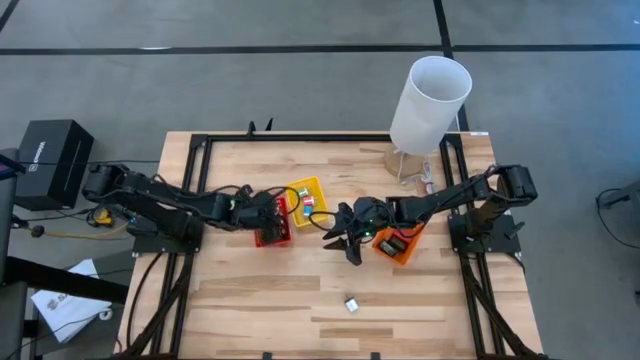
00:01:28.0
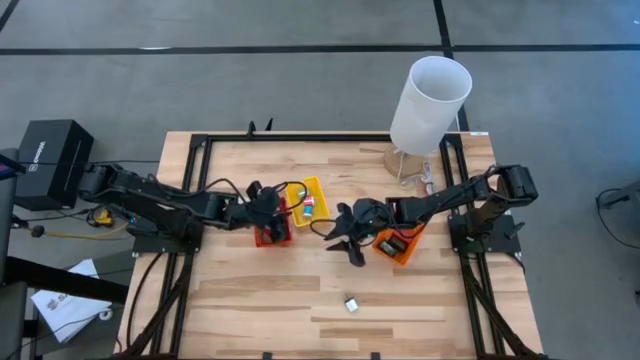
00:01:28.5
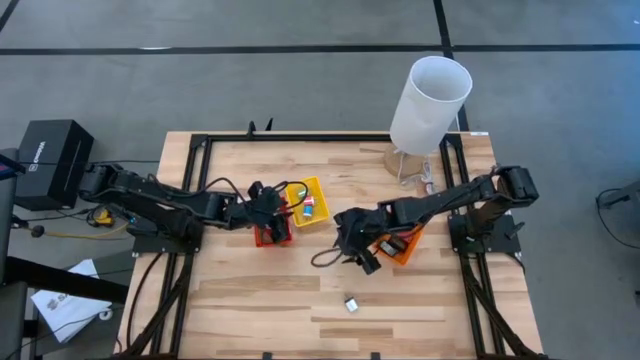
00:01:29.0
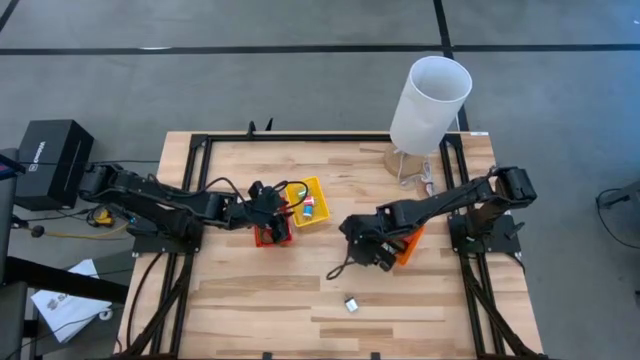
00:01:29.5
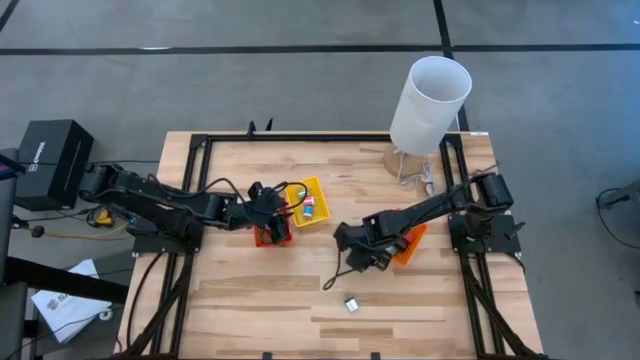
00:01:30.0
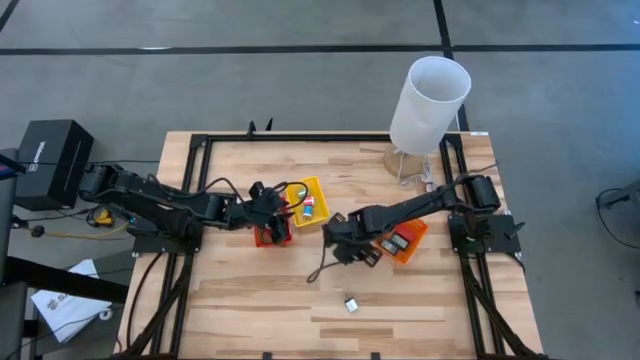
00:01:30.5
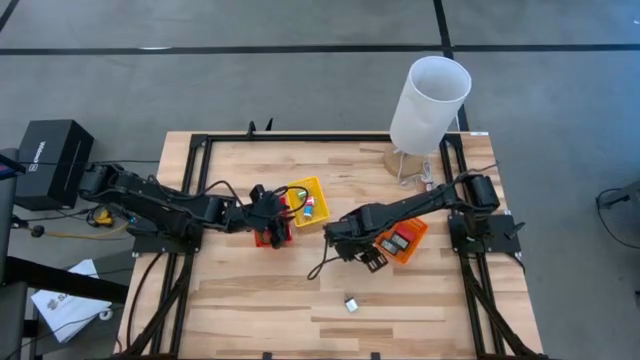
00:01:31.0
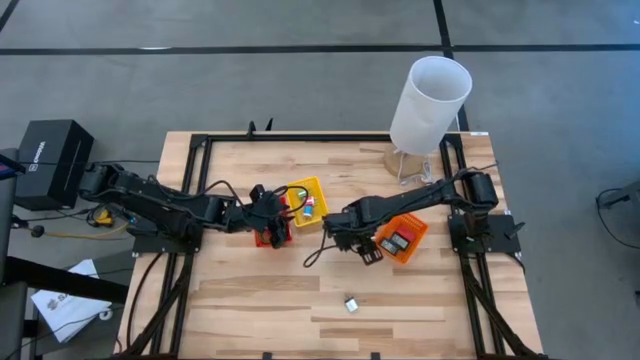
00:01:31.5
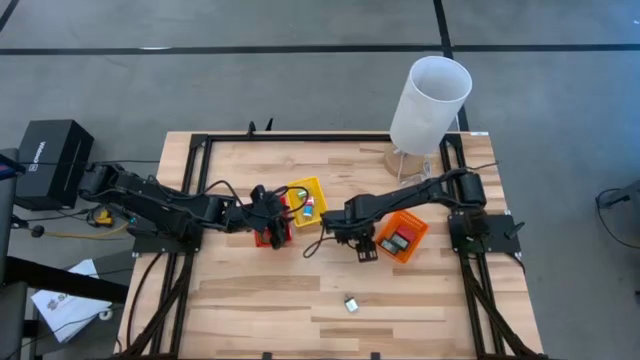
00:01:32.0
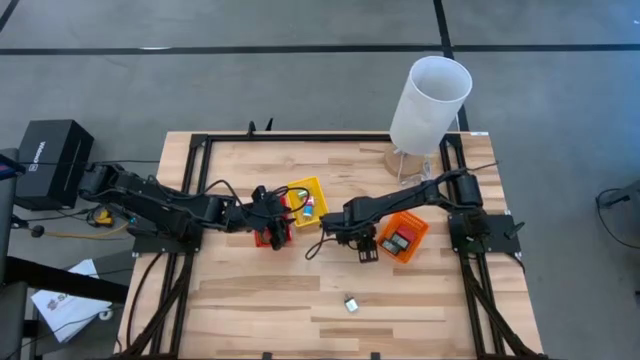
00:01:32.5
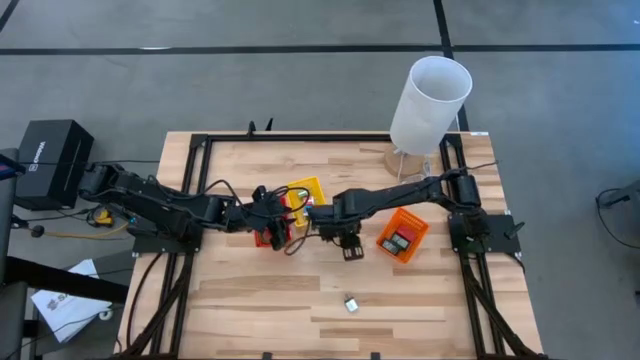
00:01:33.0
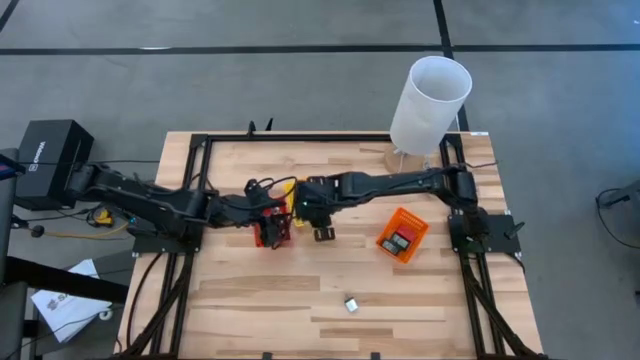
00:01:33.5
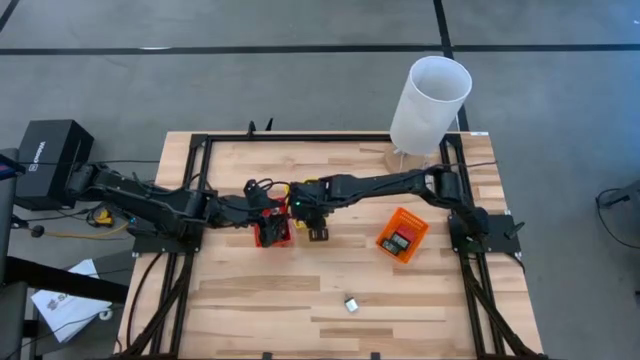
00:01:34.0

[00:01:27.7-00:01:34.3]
Task: Pick & Place Office items
Put the black charger adapter into the yellow bin

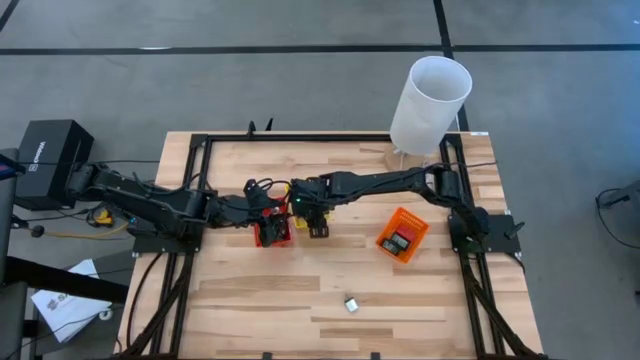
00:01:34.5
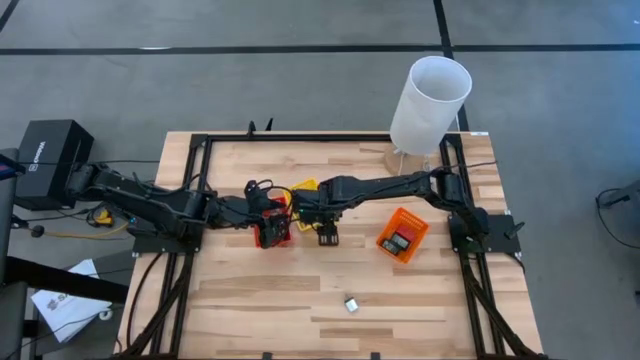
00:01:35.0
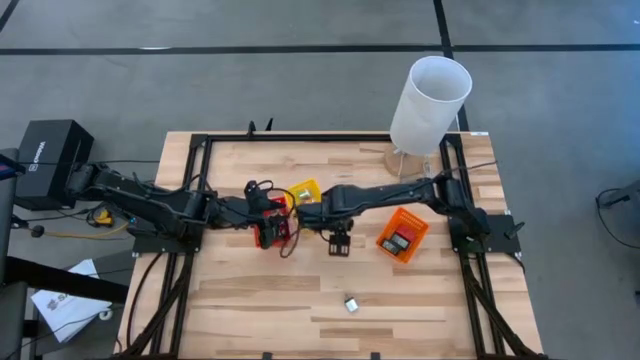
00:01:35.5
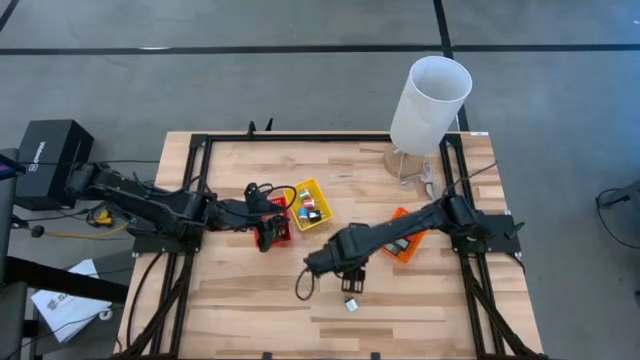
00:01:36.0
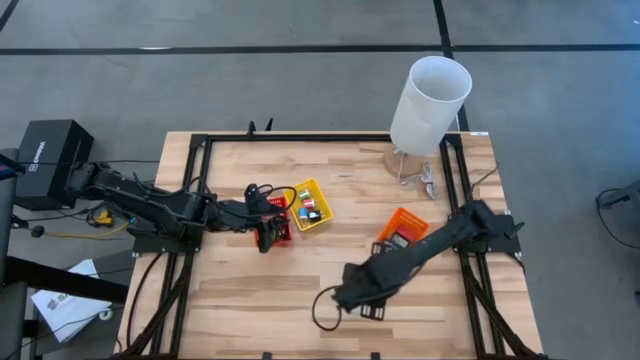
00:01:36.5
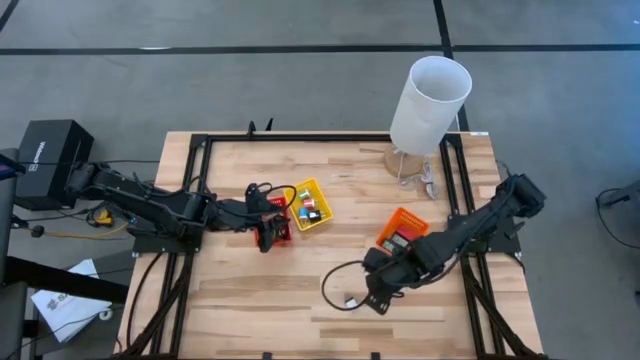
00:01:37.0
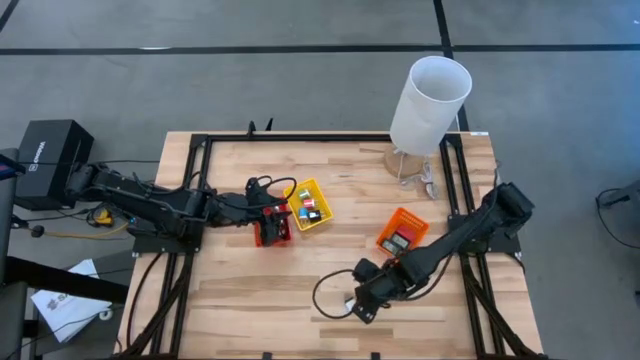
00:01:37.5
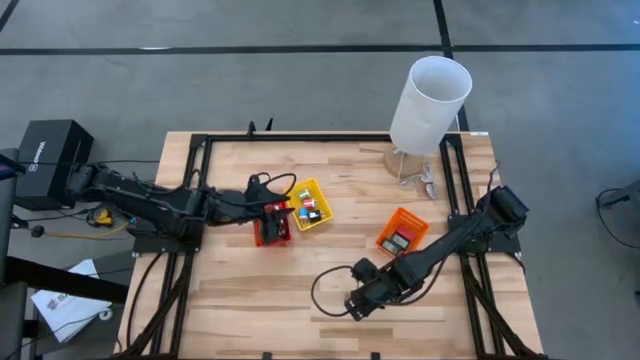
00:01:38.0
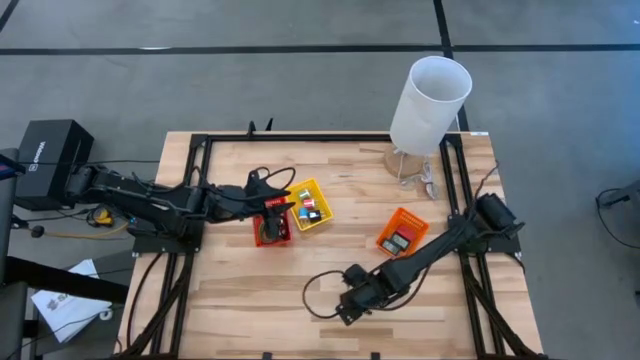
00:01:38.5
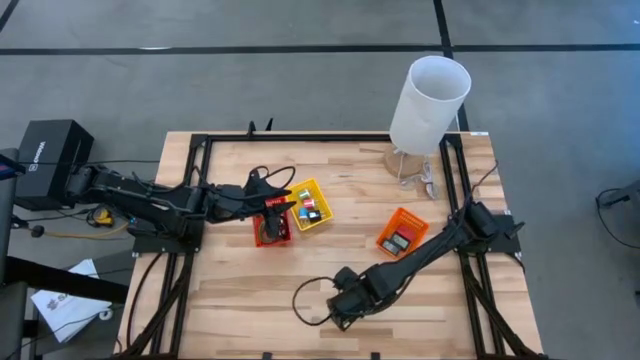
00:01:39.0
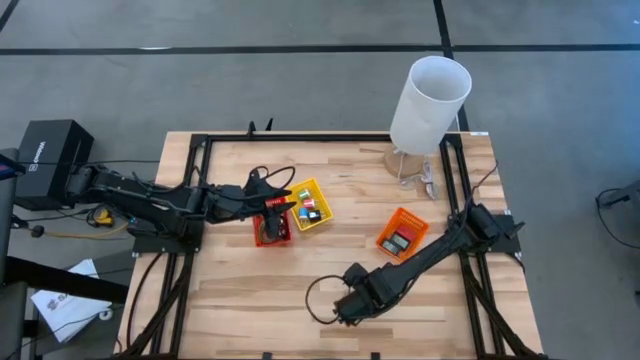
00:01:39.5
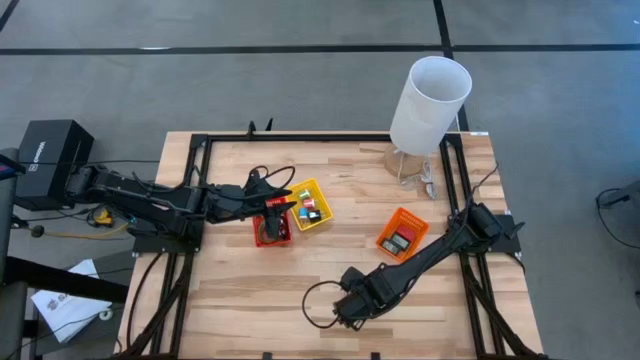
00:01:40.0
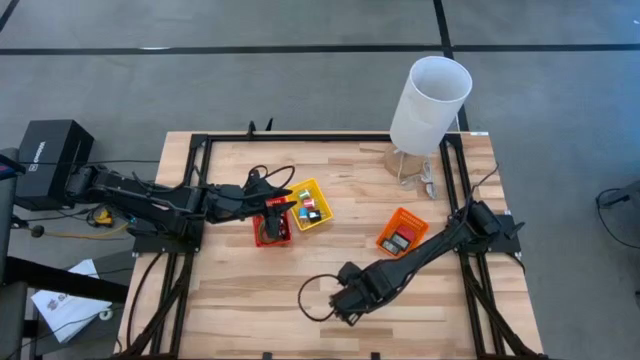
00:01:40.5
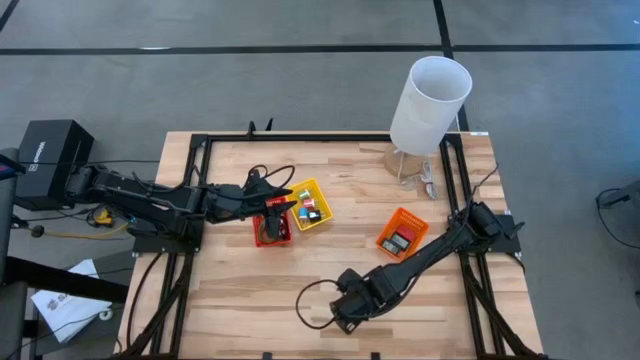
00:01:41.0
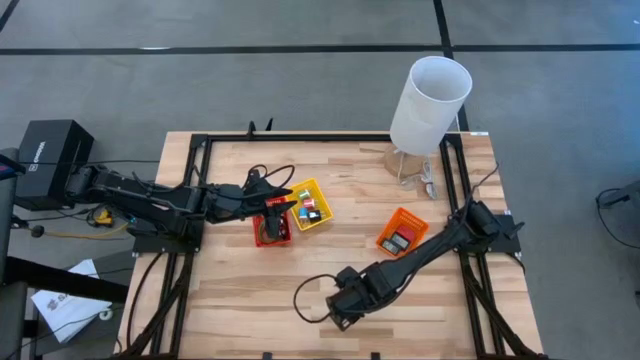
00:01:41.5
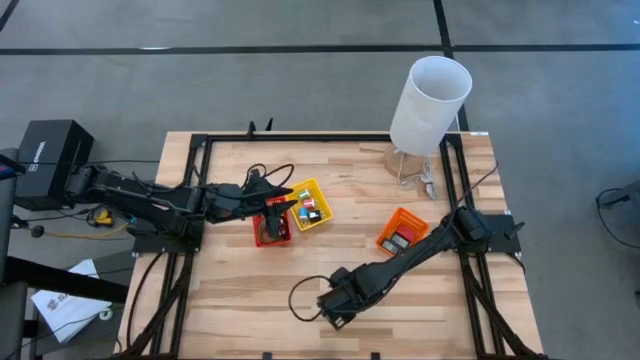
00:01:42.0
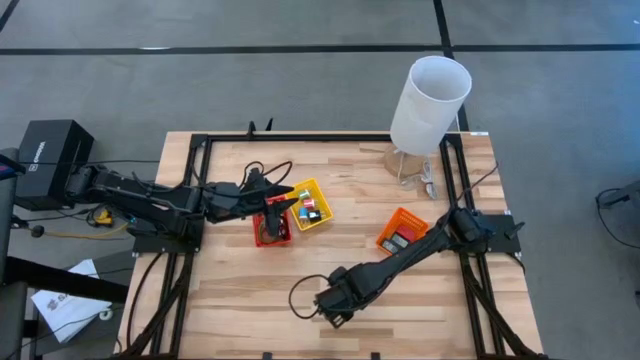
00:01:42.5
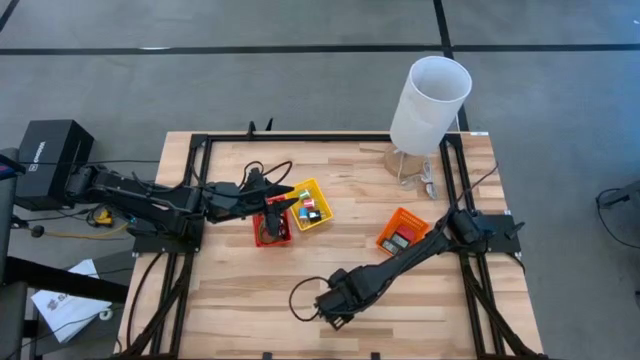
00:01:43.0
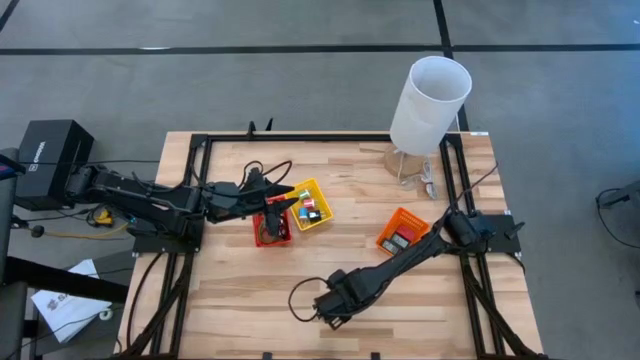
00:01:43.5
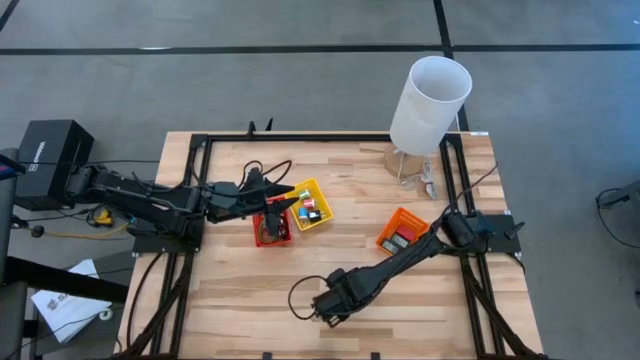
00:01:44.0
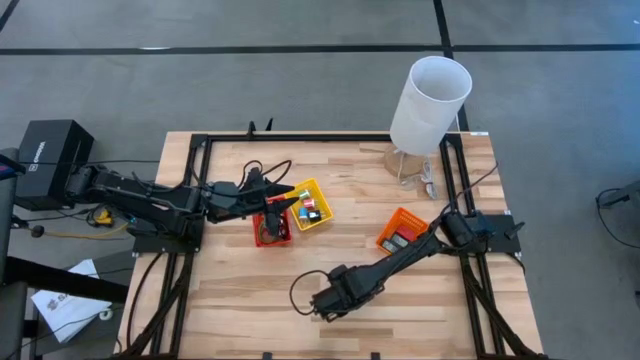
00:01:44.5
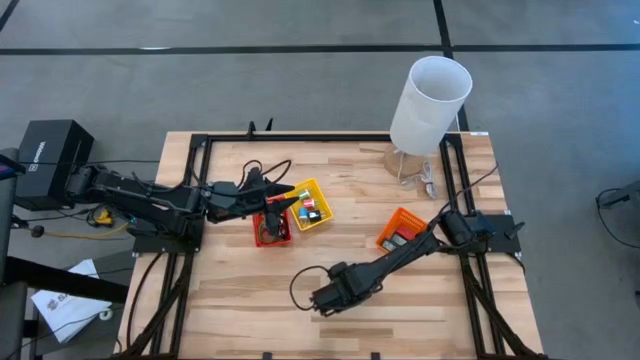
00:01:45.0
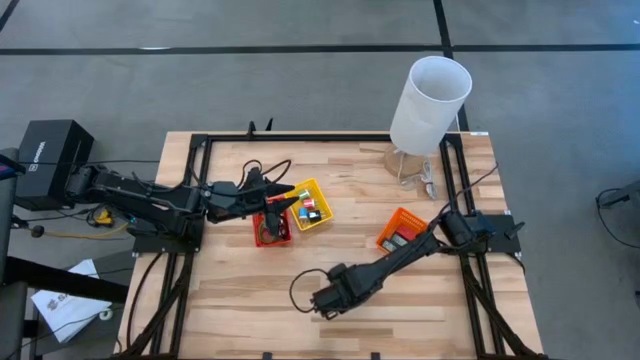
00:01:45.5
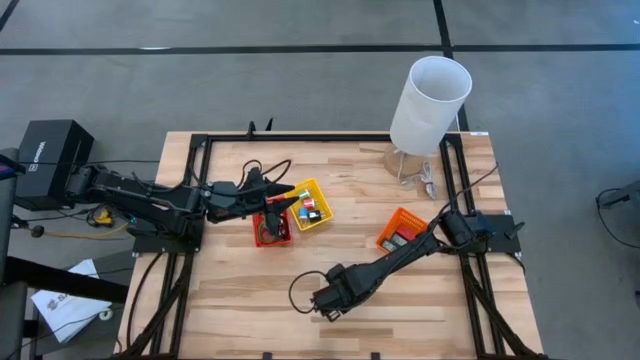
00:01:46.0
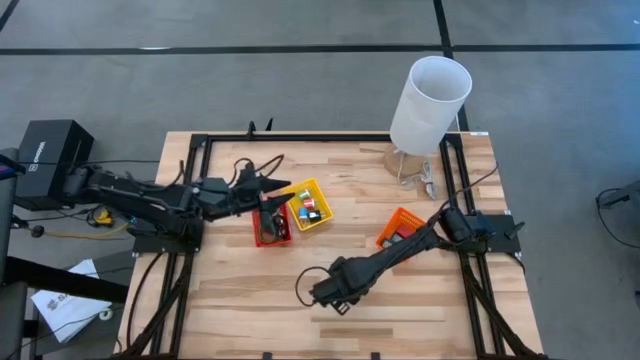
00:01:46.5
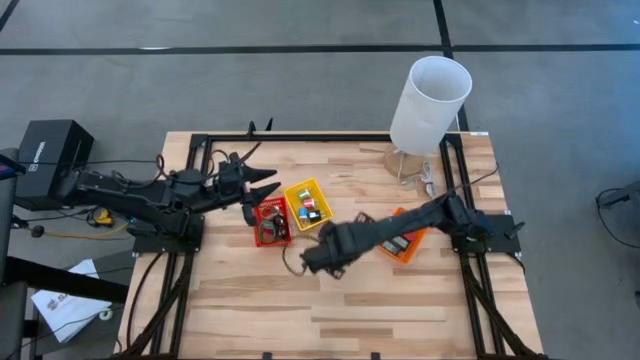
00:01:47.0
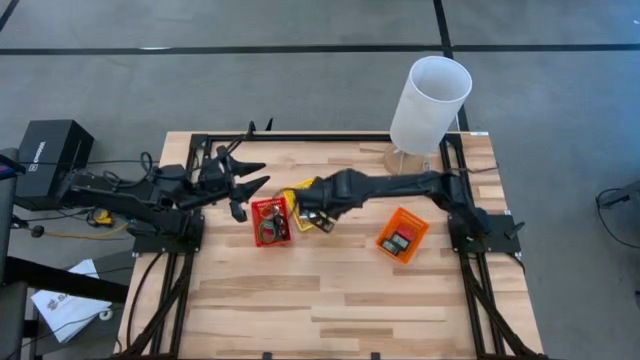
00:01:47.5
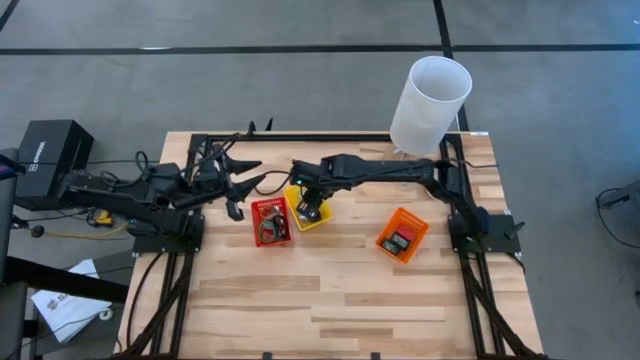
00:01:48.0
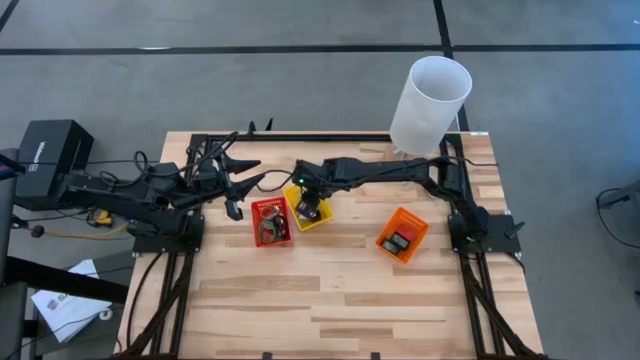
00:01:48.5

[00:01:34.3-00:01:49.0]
Put the white charger adapter into the yellow bin

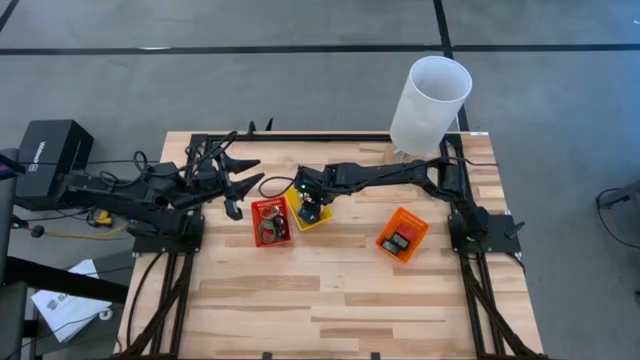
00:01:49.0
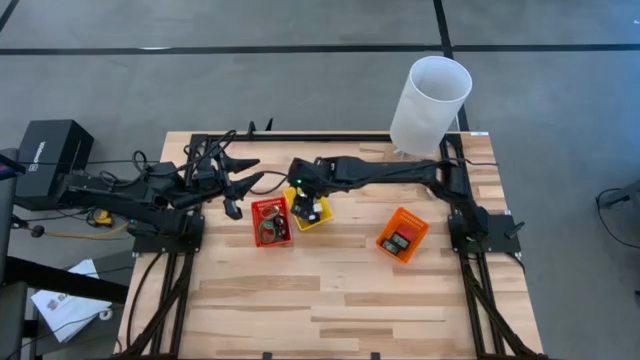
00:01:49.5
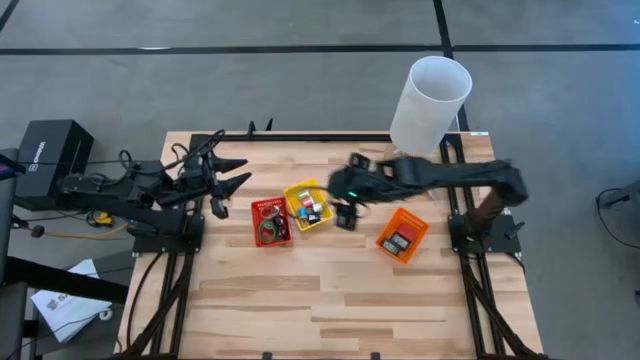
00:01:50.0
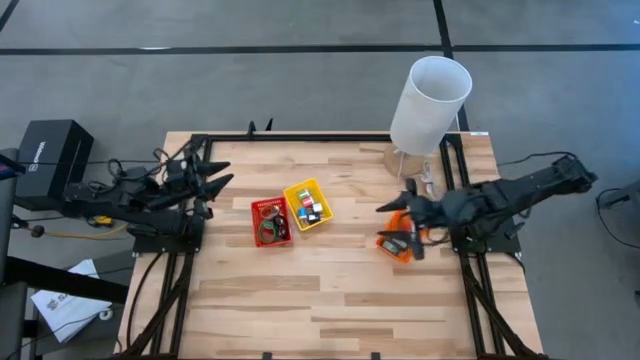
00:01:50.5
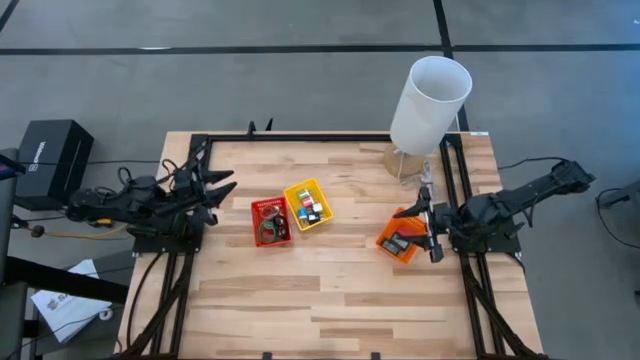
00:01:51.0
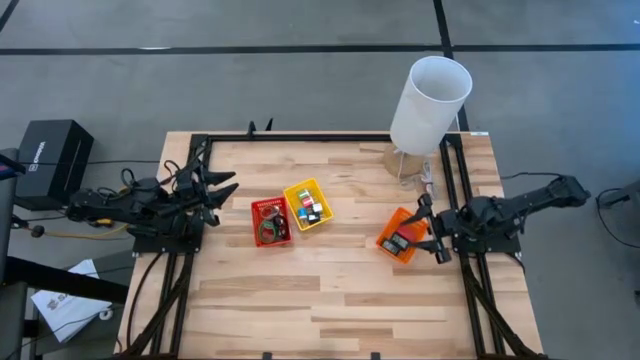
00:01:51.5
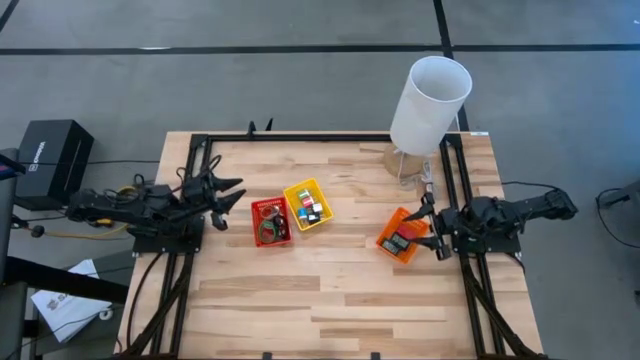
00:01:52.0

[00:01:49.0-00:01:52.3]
Return to Home Position
